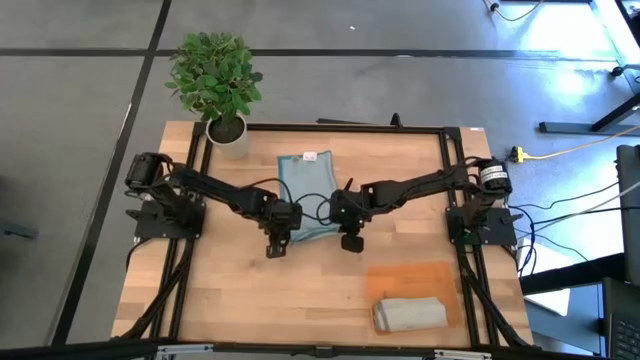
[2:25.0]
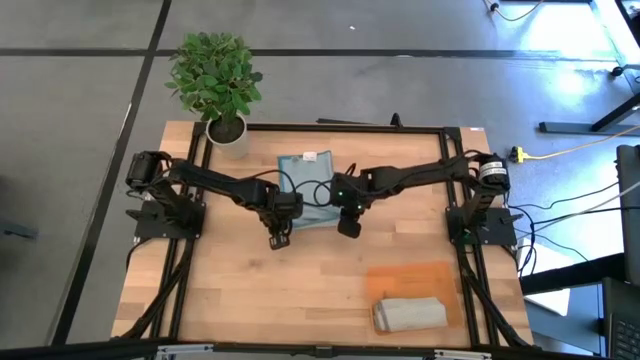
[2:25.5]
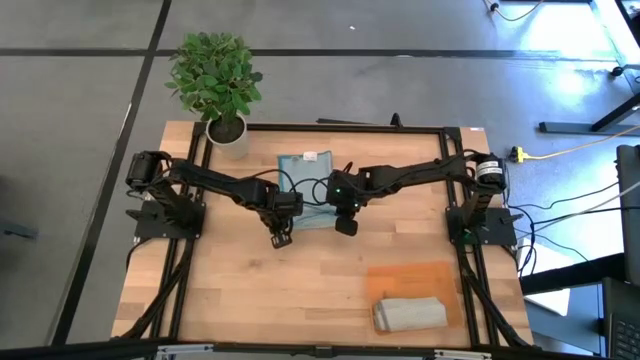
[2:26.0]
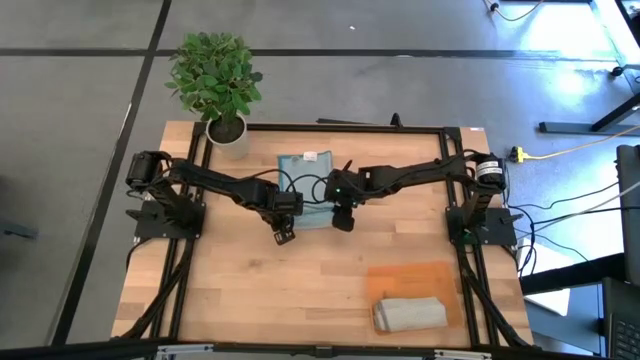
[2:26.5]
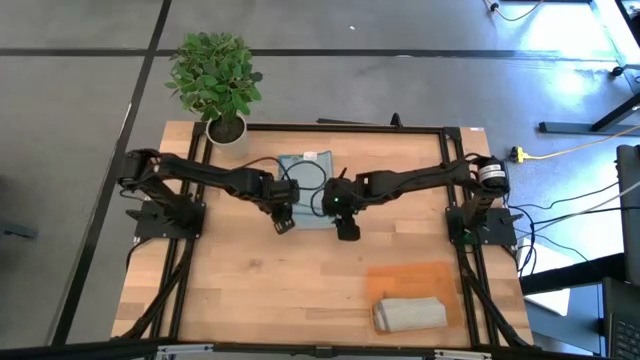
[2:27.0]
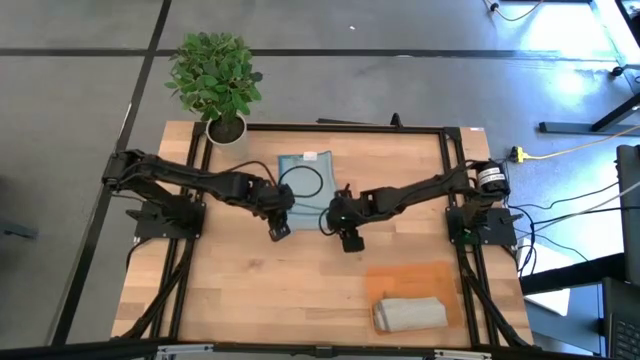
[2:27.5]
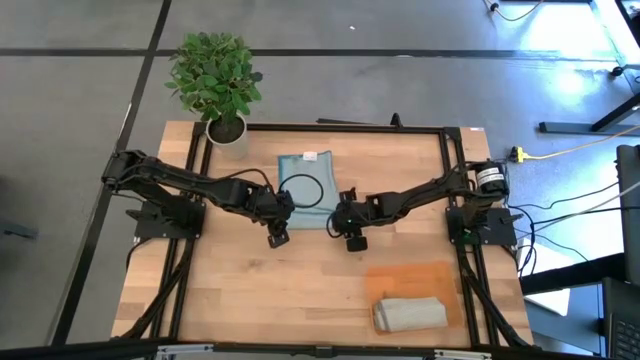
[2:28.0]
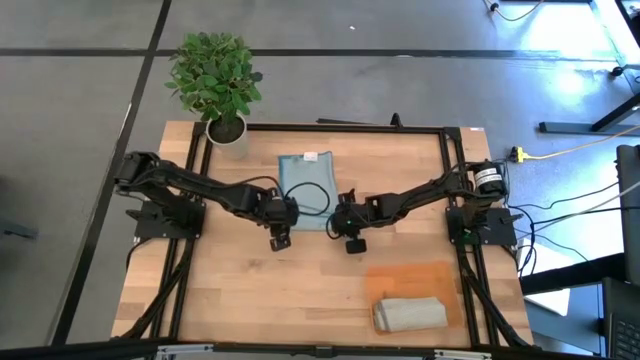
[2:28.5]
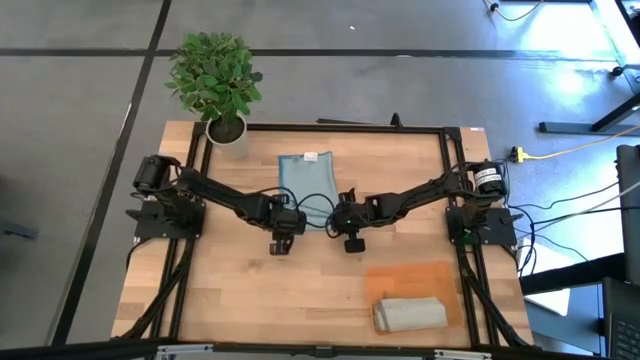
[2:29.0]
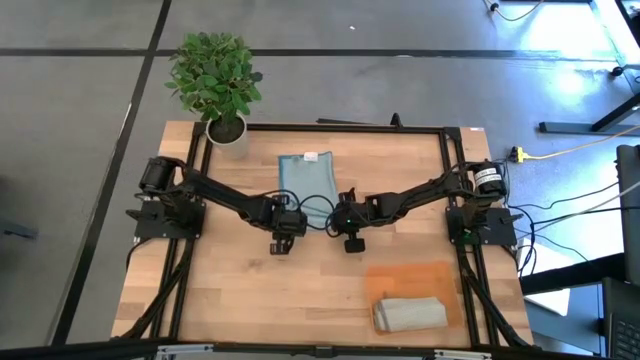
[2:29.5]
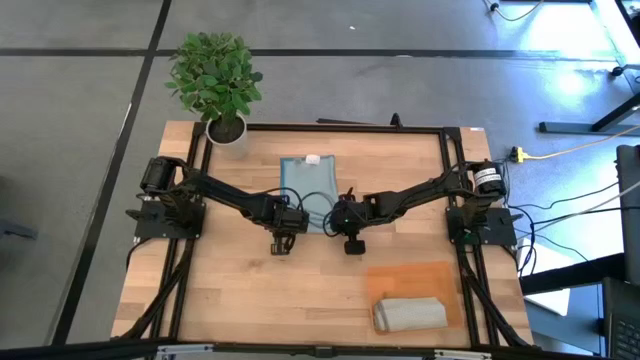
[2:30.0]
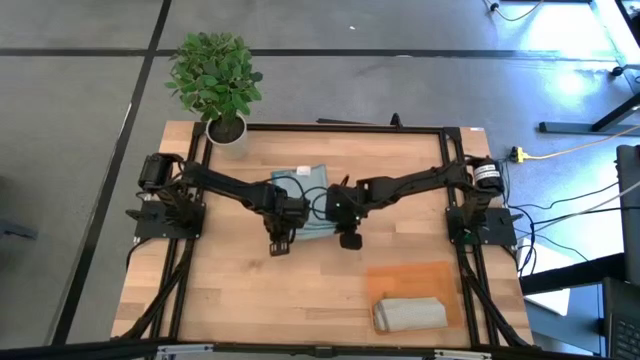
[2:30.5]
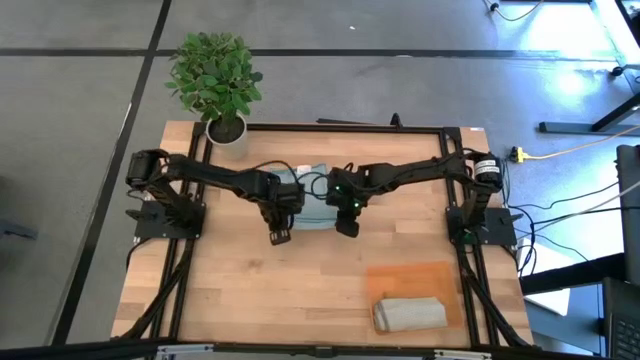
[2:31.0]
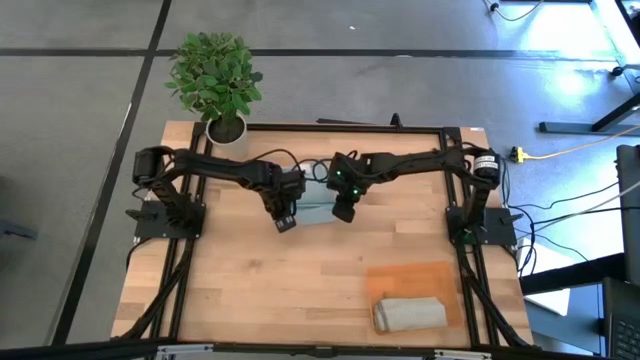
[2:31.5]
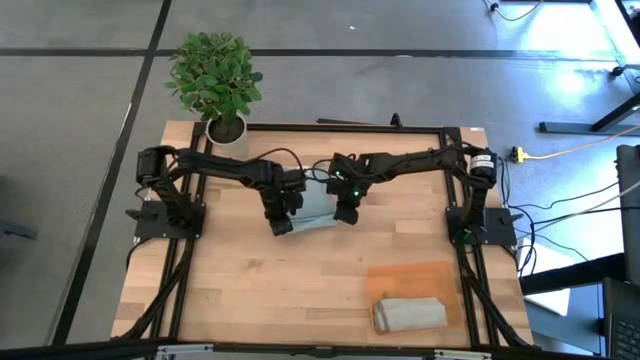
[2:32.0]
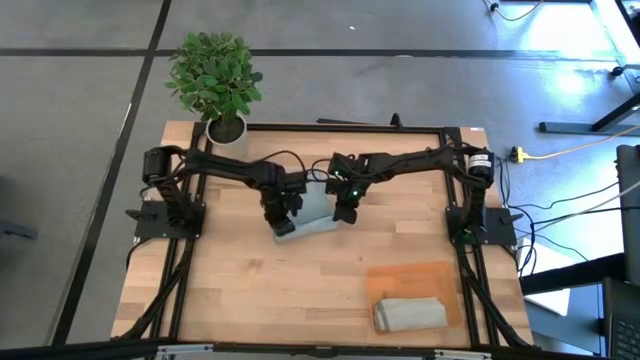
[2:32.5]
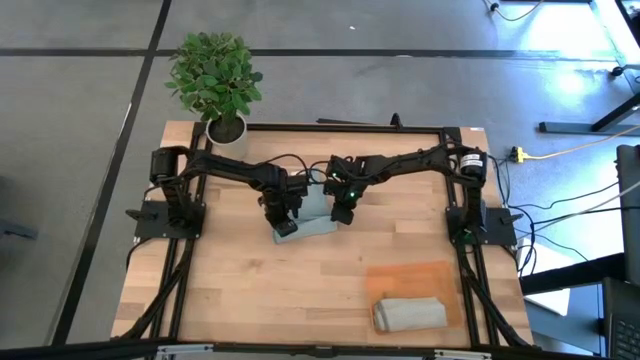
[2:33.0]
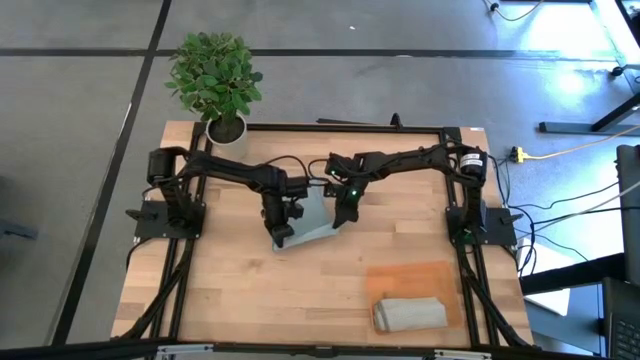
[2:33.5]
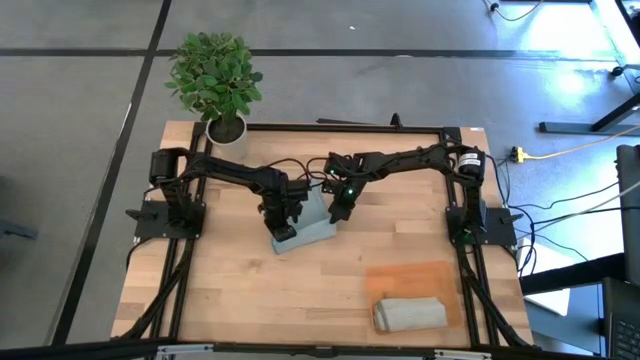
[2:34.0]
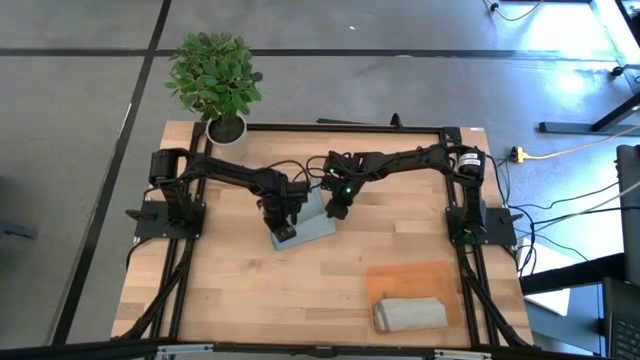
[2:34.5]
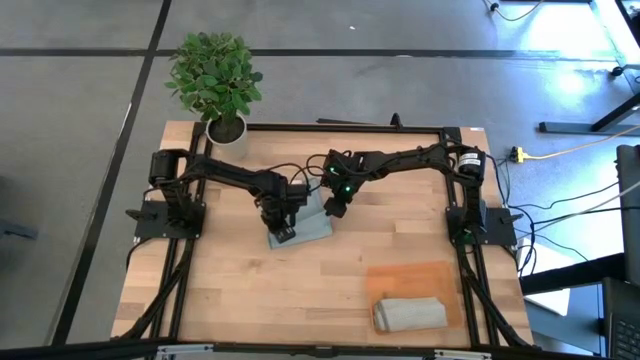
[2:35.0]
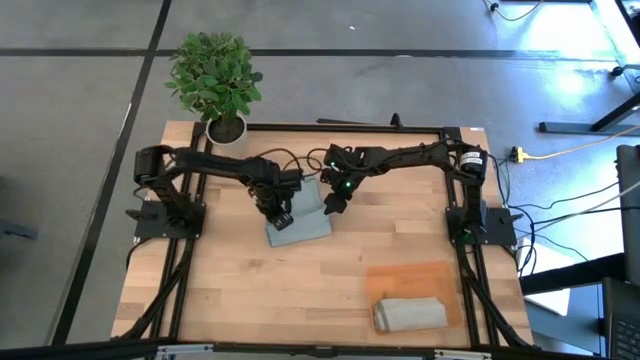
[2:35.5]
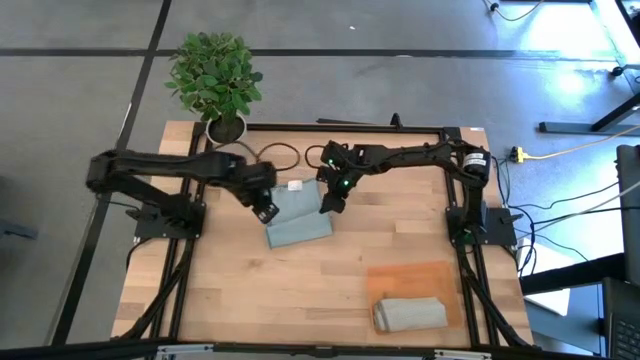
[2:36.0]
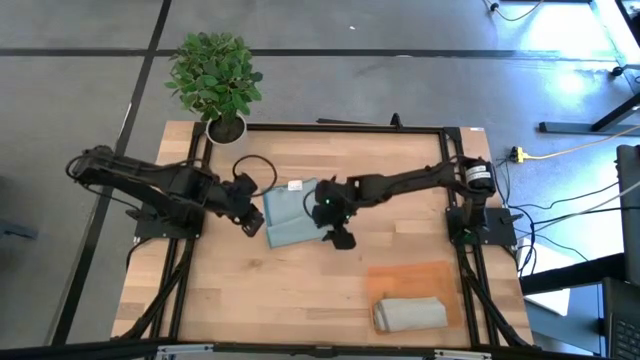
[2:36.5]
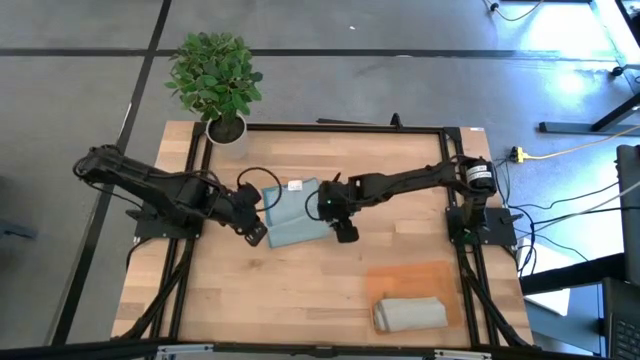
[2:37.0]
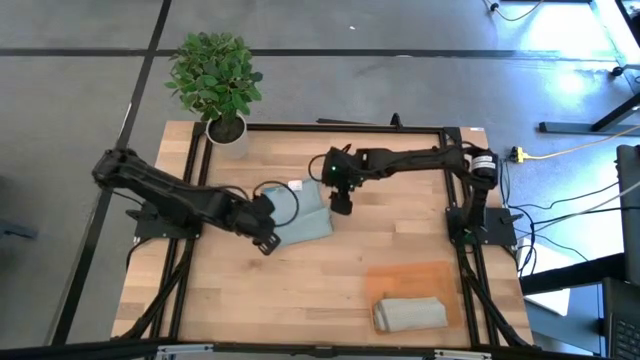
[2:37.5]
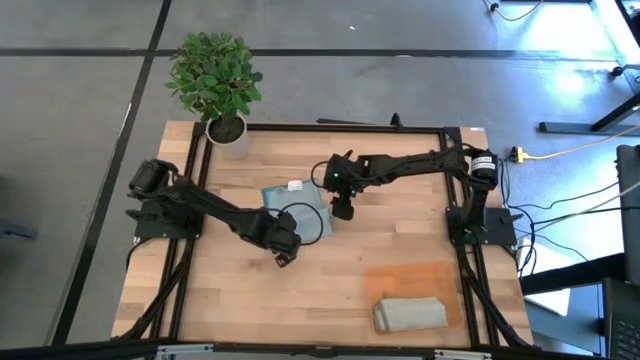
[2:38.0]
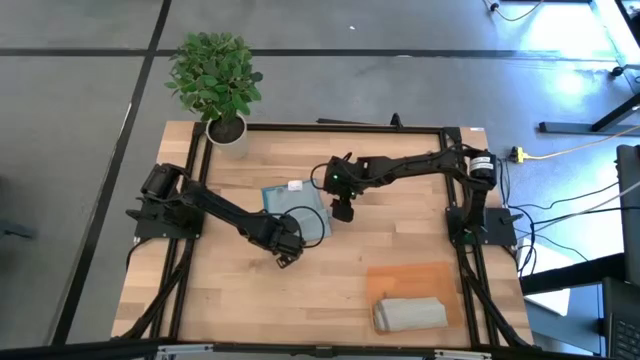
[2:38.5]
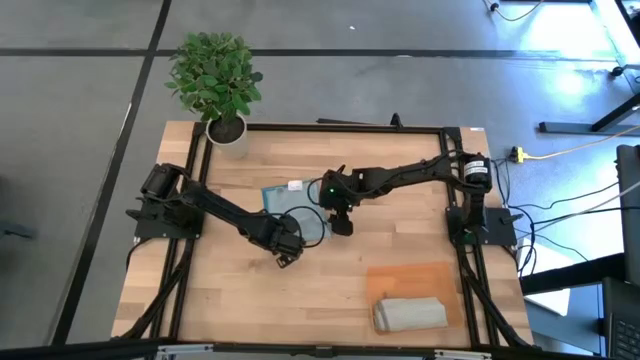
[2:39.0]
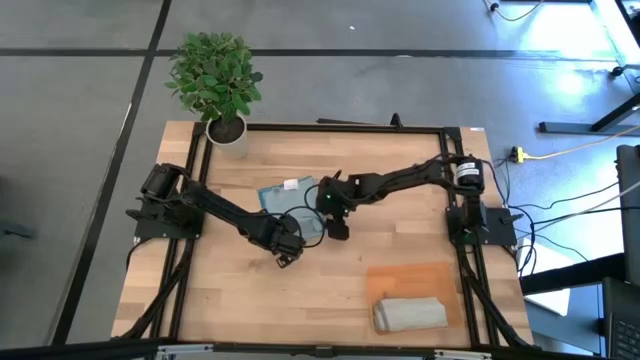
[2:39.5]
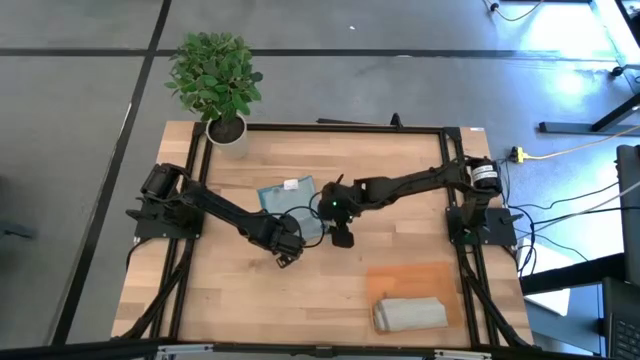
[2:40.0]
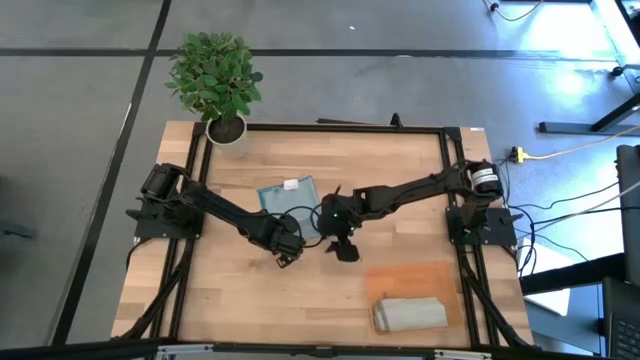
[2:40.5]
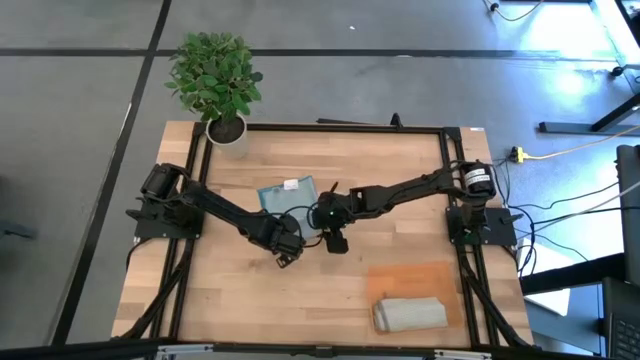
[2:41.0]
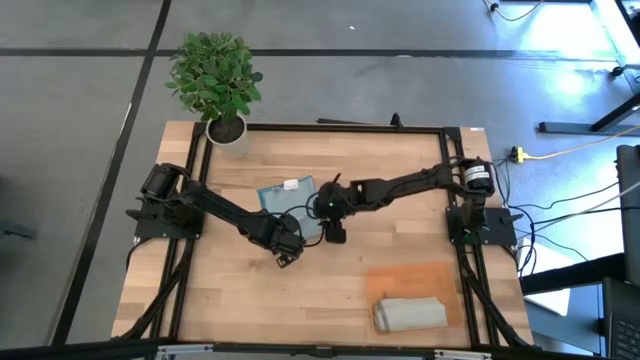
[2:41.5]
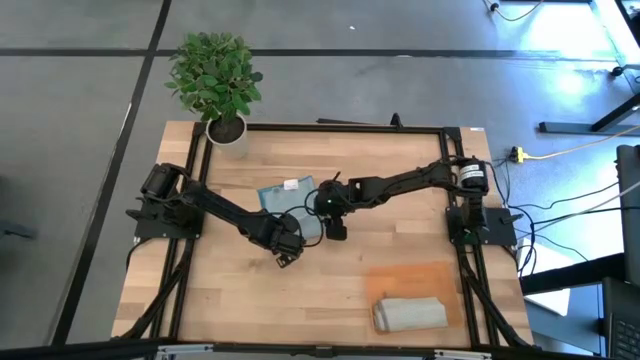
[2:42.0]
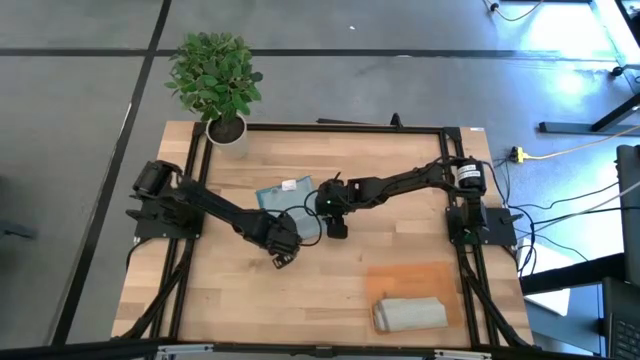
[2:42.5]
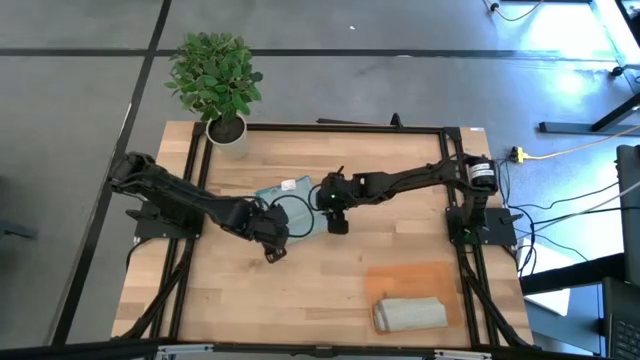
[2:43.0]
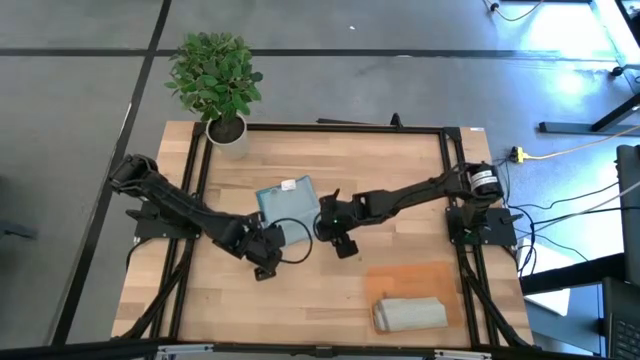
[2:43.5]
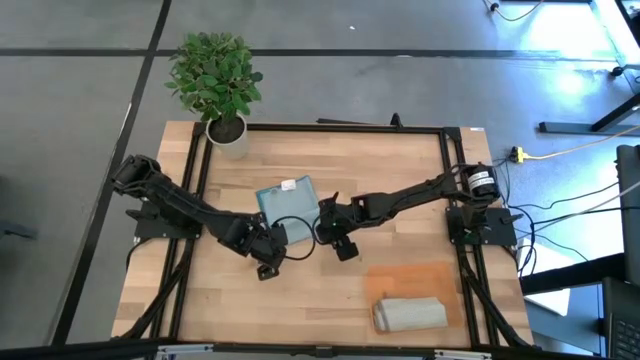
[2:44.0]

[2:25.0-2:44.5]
Task: Roll microfiber towels into tight, uniform cylinder then place into a basket
Roll the light blue microfiber towel

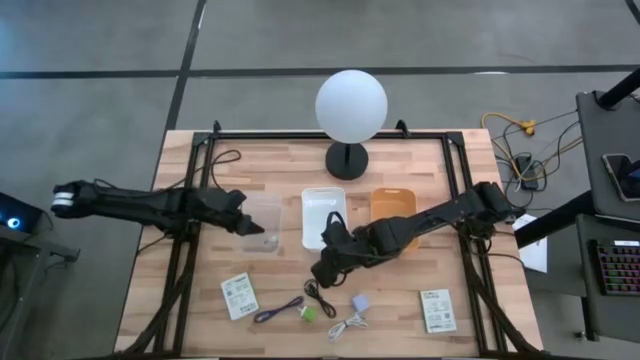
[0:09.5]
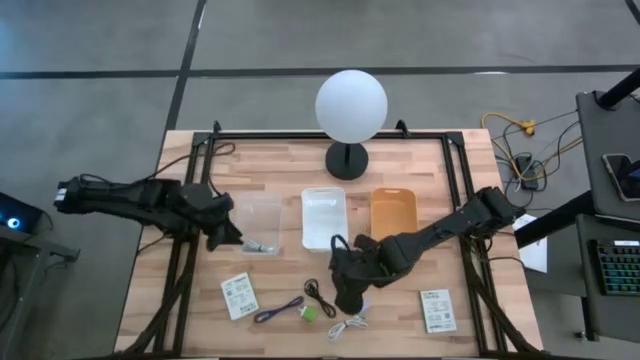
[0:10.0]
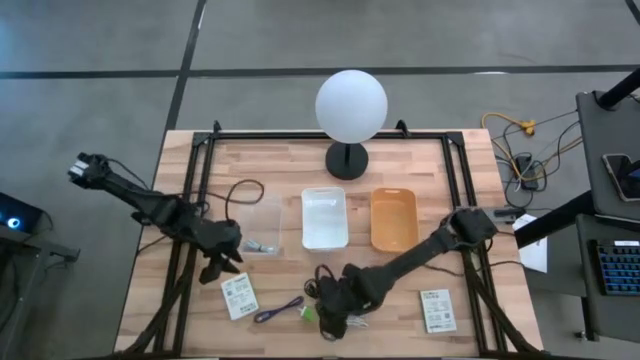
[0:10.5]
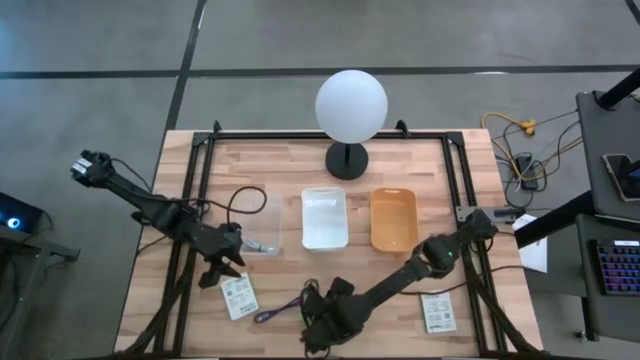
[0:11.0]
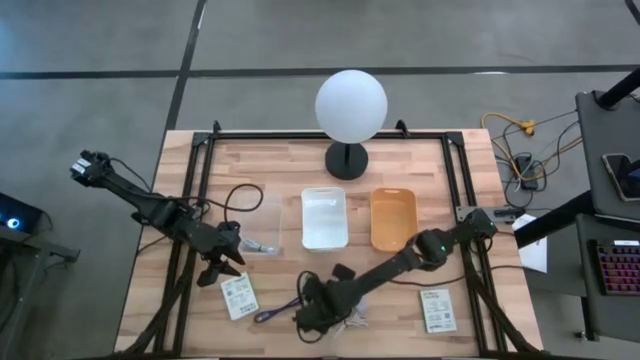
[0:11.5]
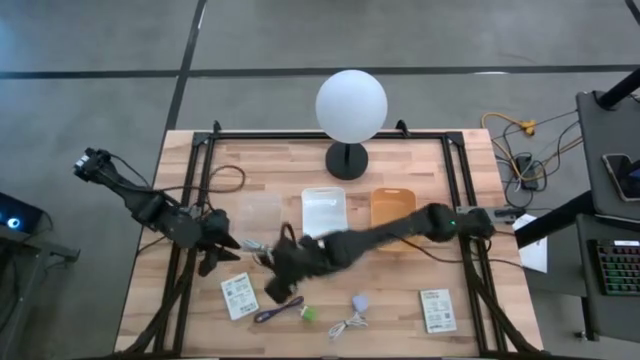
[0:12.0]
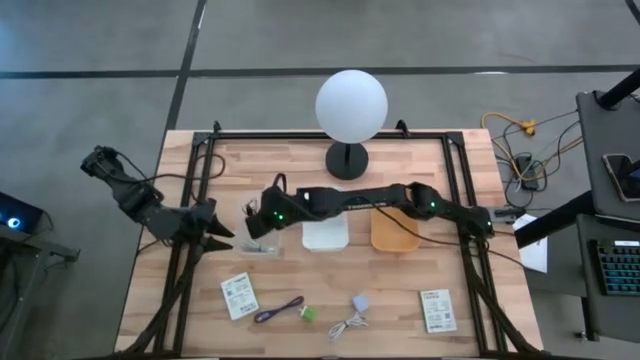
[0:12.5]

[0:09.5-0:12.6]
Task: Pick and place items into bin
Put the black charger cable into the transparent bin
